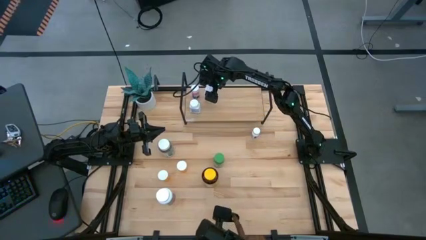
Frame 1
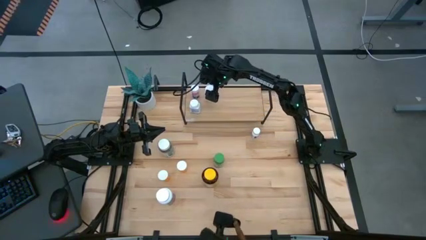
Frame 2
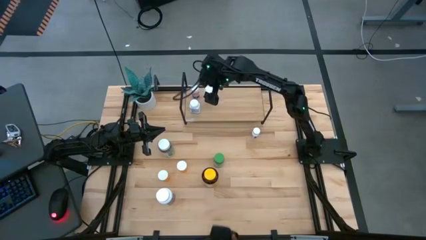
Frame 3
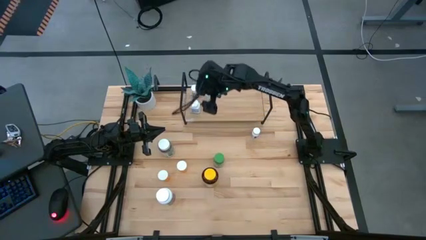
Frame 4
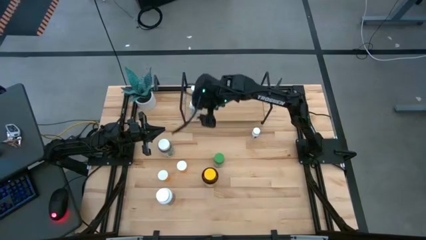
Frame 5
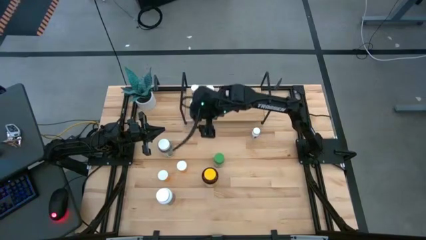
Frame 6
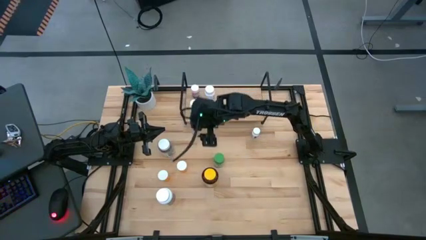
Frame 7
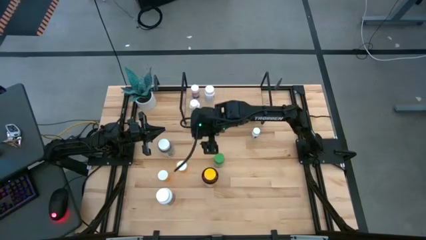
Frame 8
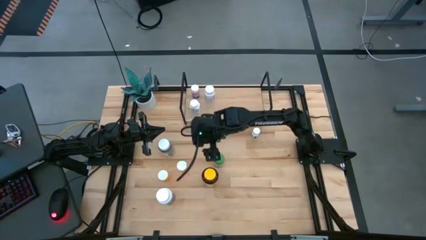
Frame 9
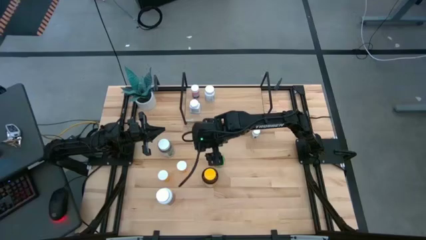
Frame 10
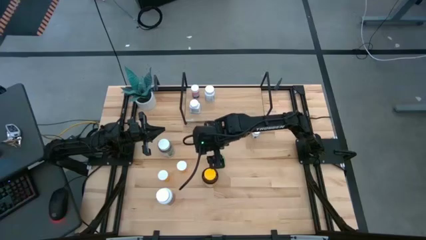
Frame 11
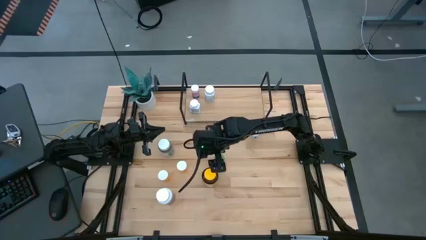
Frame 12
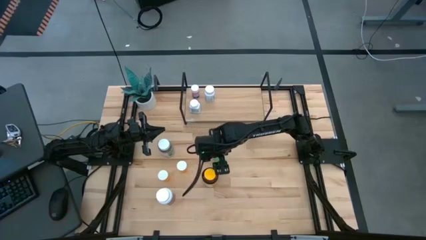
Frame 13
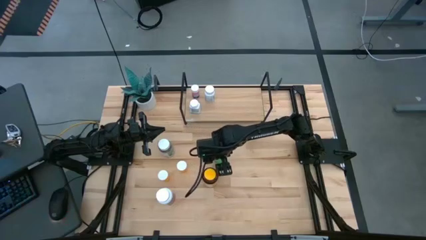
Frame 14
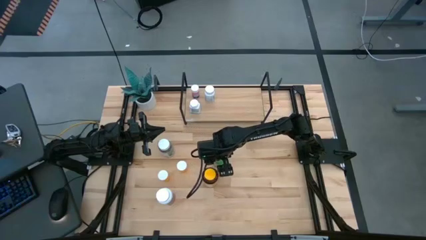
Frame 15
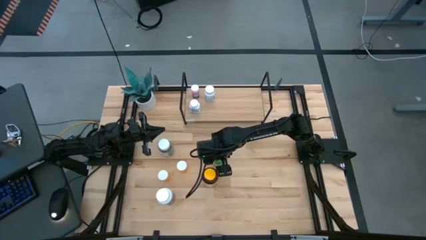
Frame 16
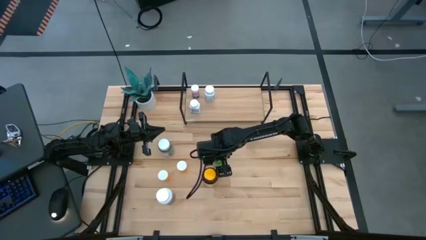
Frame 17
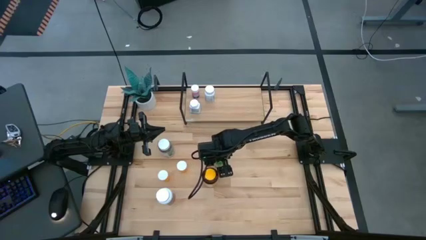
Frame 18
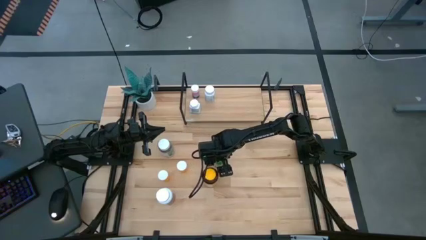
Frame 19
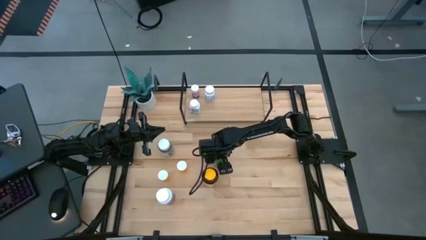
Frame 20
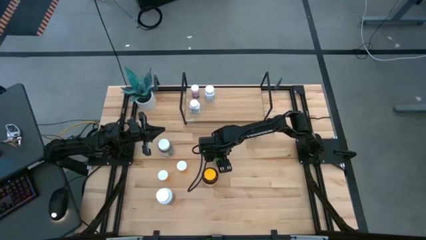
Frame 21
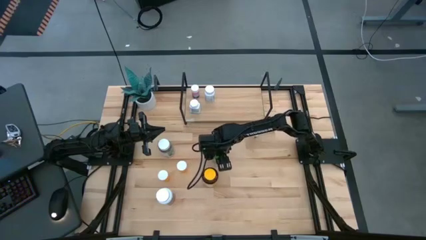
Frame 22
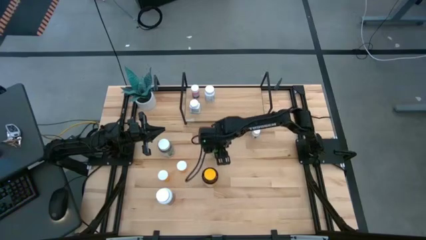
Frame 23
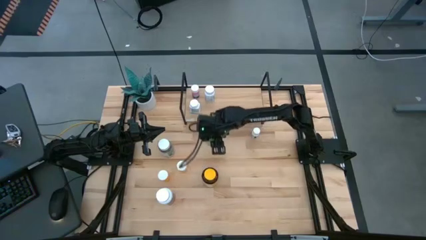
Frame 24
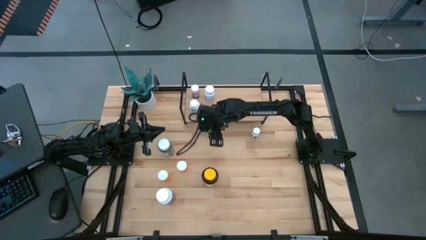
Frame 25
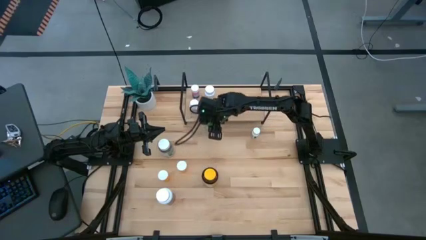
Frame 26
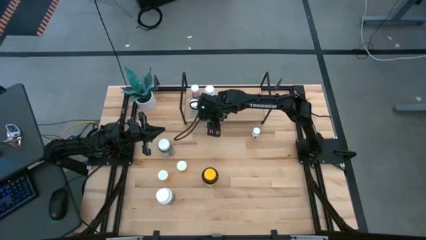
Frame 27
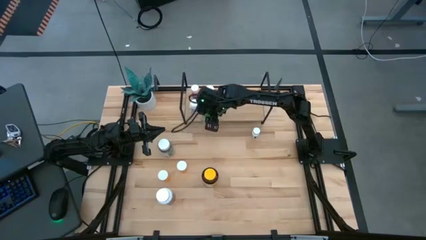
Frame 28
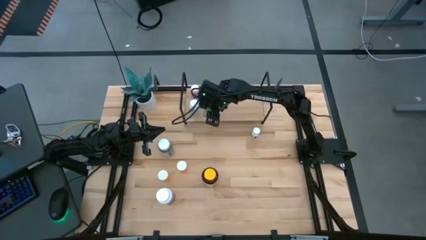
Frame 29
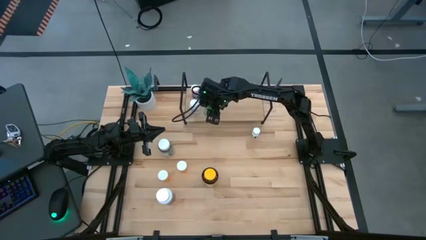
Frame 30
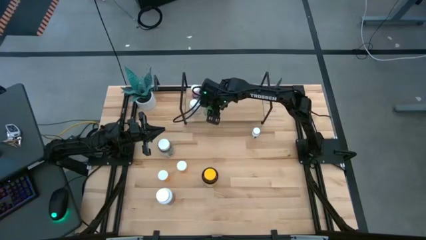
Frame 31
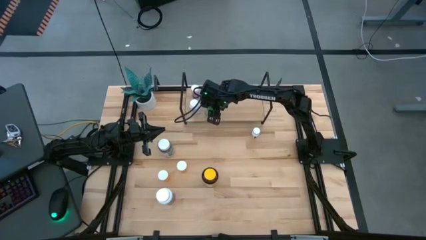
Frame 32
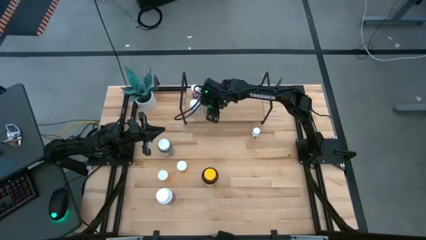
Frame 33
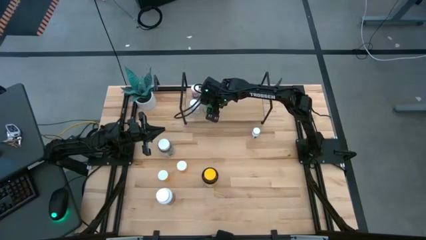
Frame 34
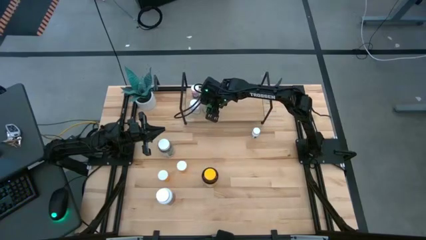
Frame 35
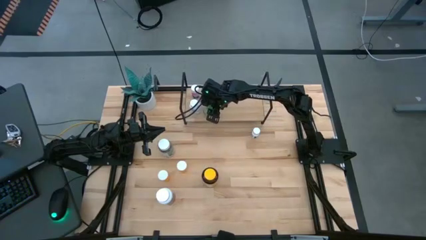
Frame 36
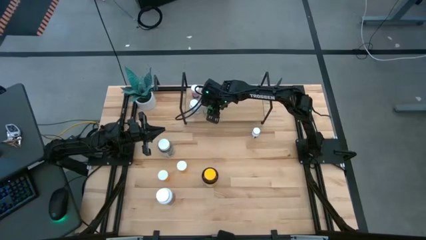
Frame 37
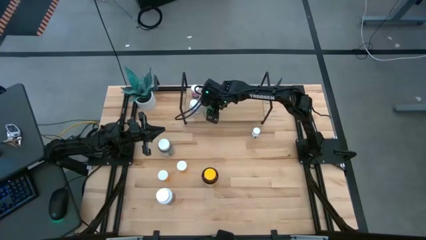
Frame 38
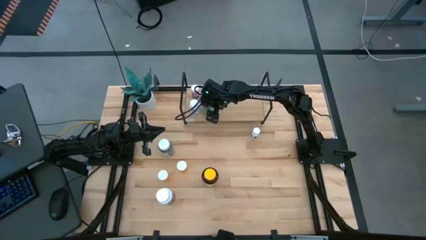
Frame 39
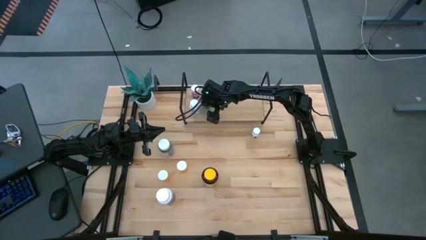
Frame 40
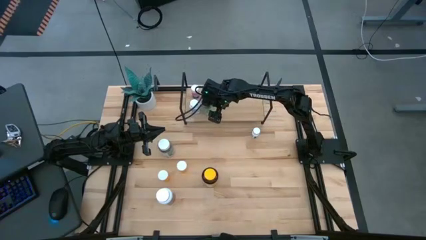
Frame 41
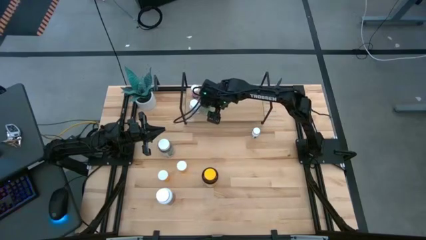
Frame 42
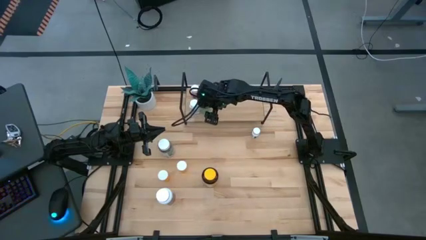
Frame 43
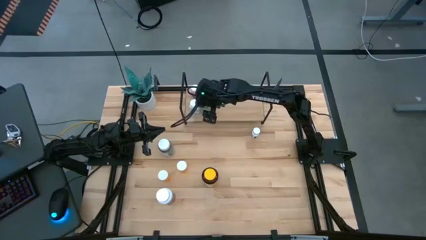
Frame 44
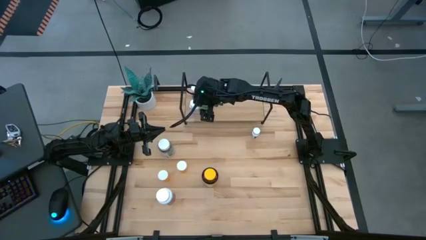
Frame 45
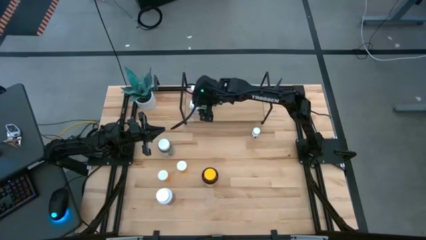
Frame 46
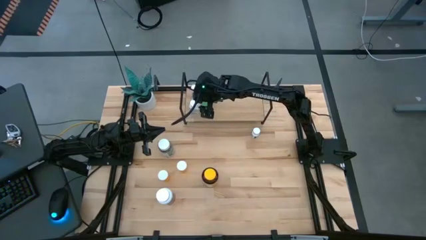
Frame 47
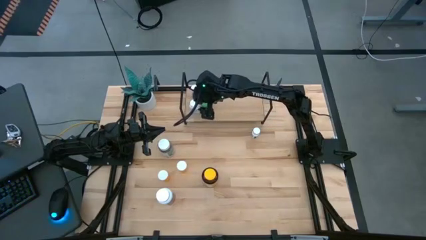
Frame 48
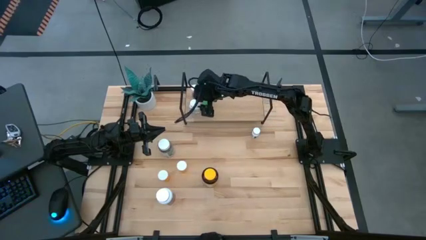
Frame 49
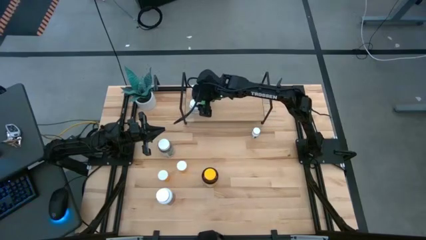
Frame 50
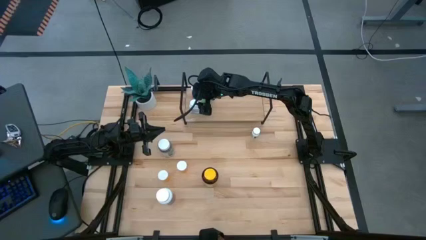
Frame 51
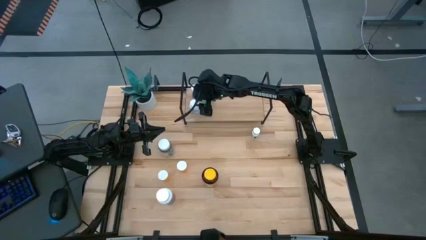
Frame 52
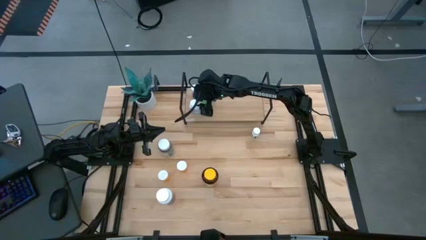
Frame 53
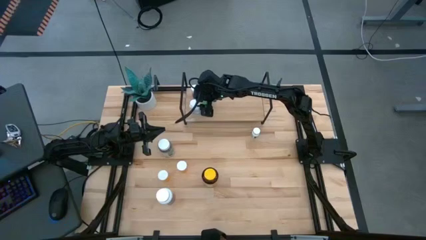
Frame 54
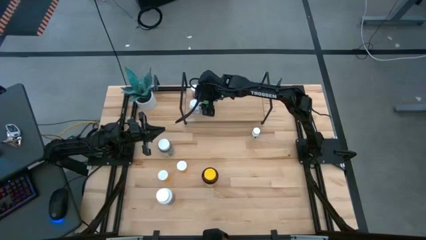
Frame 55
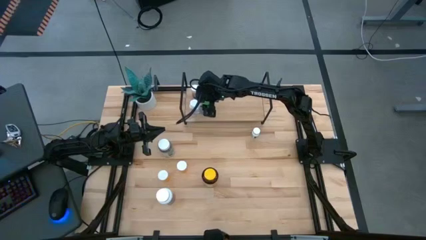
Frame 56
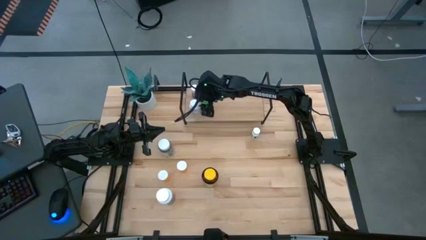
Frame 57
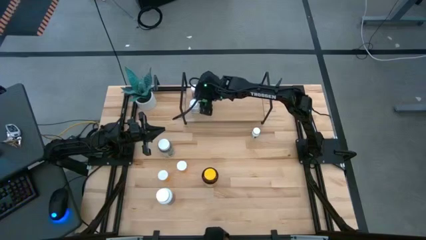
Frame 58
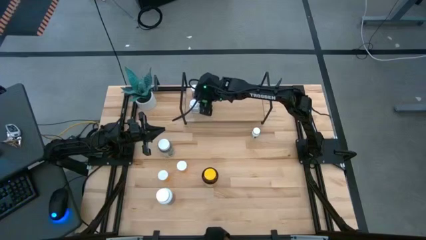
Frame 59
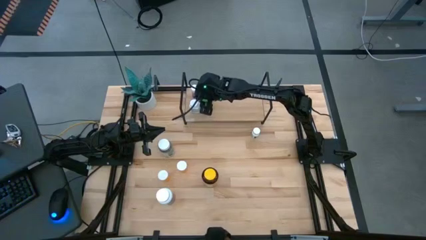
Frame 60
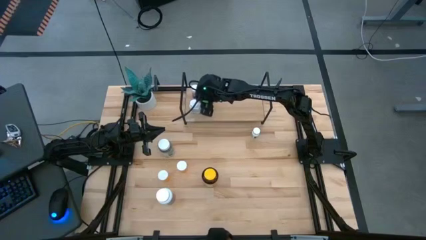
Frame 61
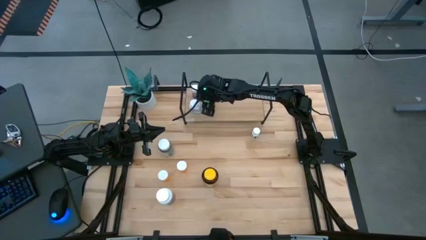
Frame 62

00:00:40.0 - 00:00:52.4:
Task: Pick and place medicine bottles onto shelf by color
Put the green pill bottle on the shelf

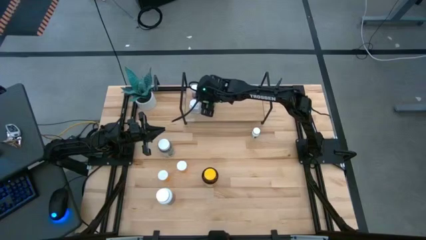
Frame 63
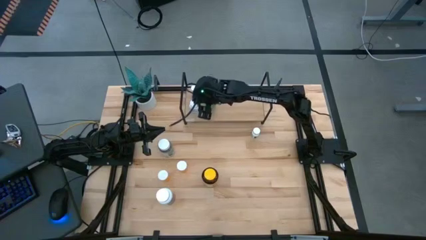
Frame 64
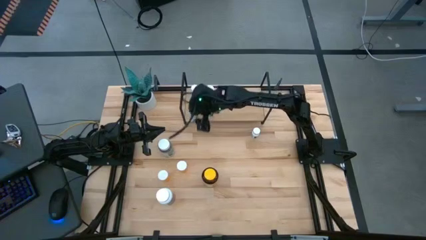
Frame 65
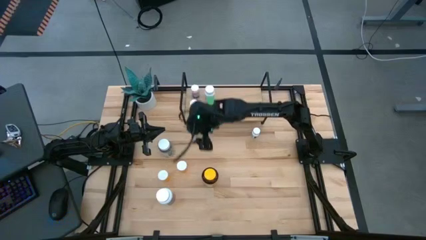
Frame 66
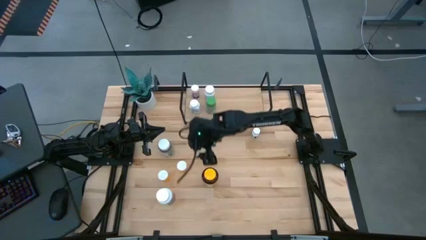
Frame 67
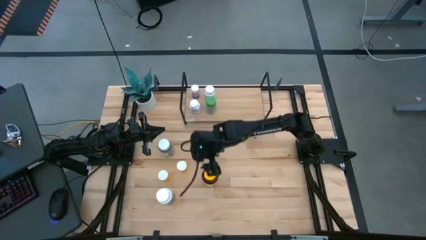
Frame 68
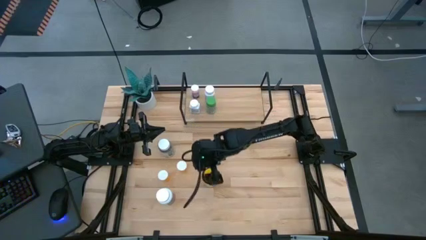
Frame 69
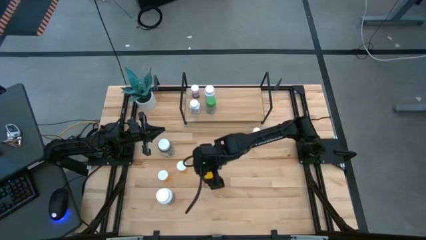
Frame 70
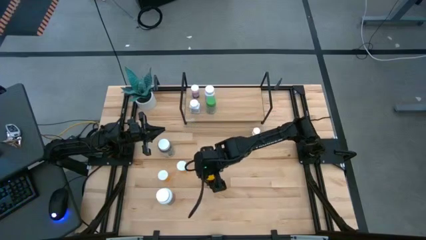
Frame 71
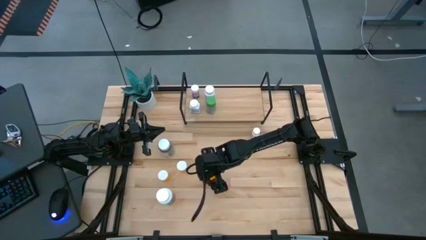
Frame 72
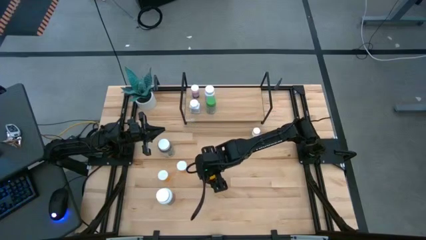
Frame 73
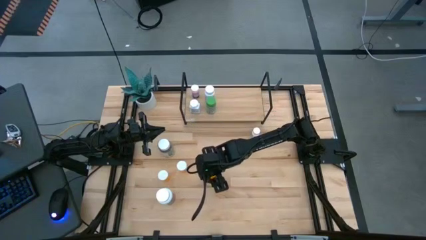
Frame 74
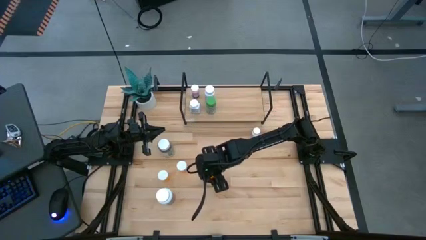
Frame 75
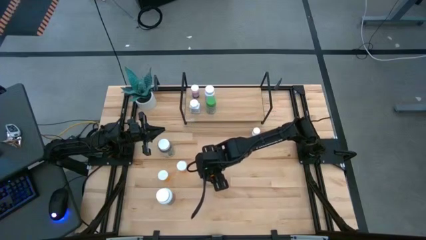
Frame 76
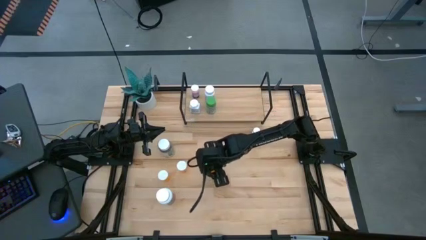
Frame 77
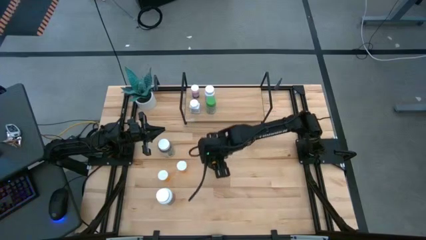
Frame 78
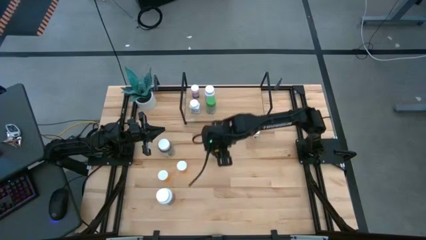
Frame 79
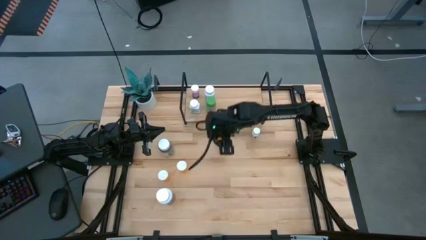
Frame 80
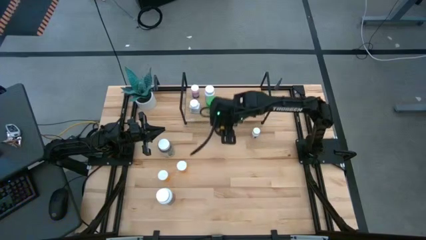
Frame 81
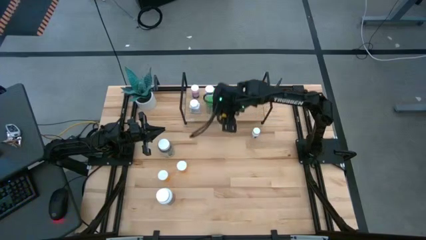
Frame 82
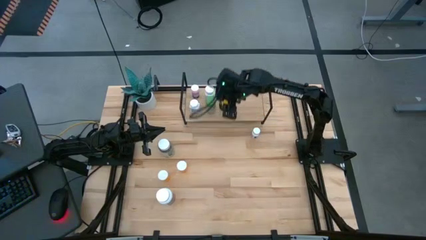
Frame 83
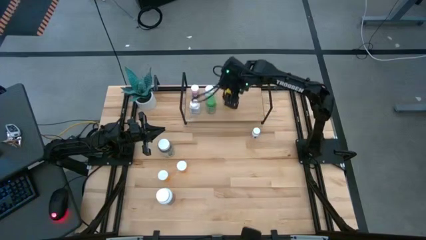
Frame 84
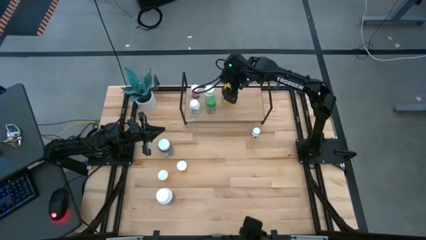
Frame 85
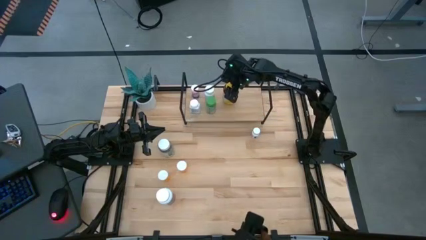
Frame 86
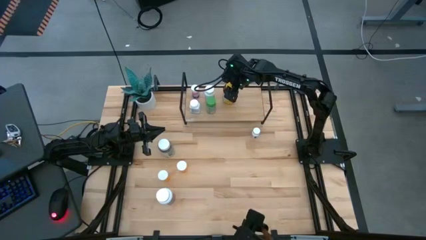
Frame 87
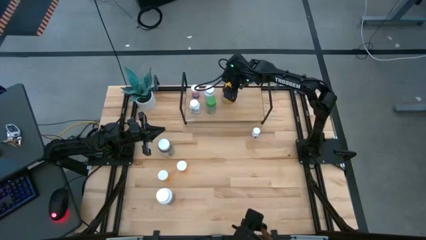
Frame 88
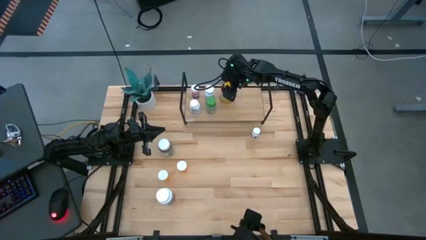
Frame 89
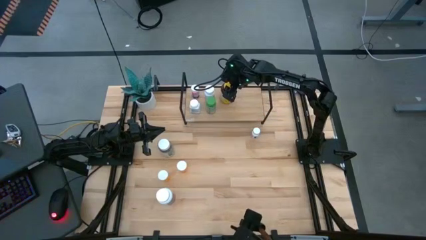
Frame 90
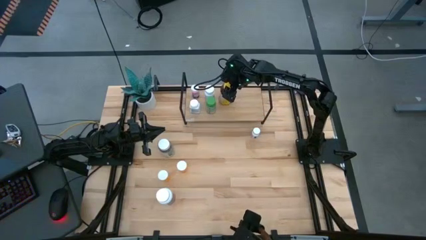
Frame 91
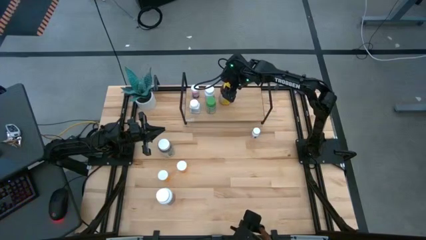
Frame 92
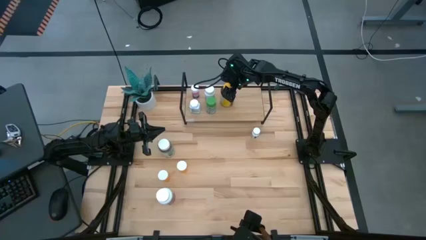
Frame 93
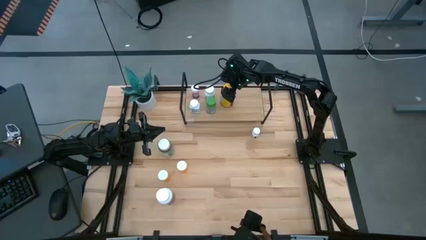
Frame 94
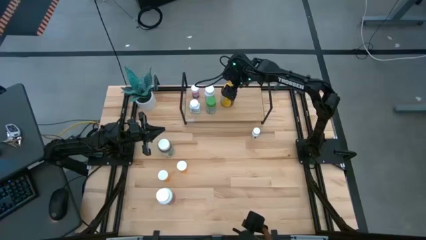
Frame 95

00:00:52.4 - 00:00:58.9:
Put the yellow pill bottle on the shelf
